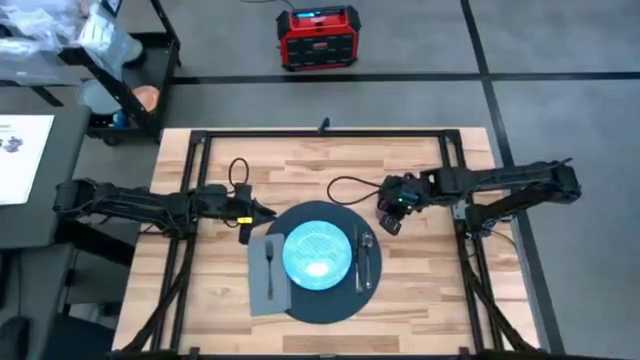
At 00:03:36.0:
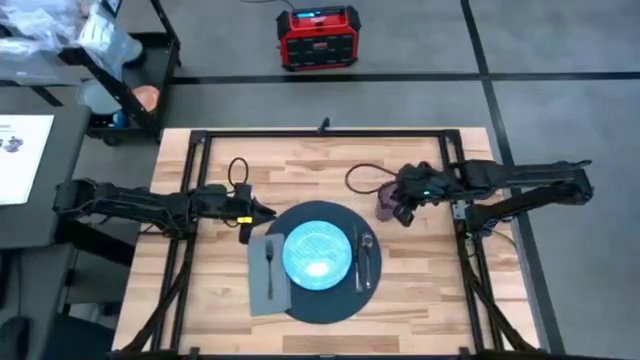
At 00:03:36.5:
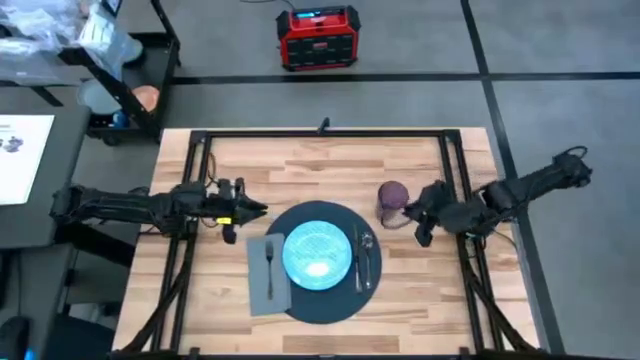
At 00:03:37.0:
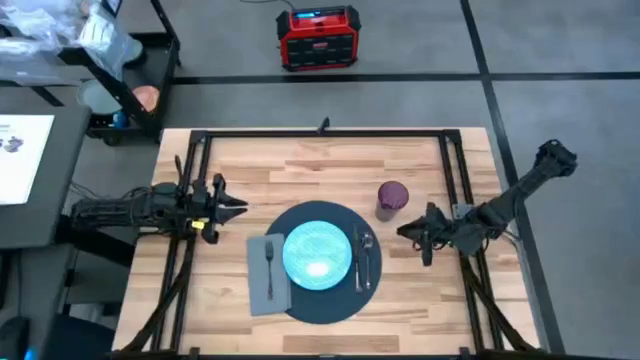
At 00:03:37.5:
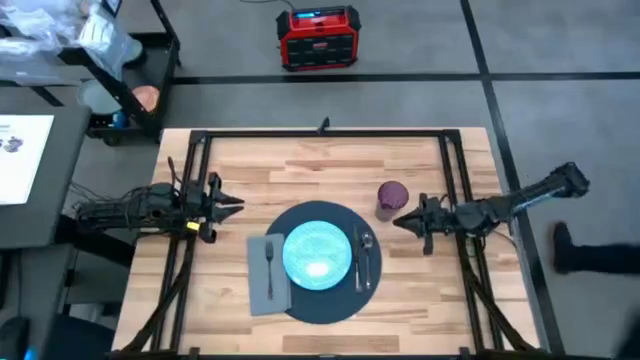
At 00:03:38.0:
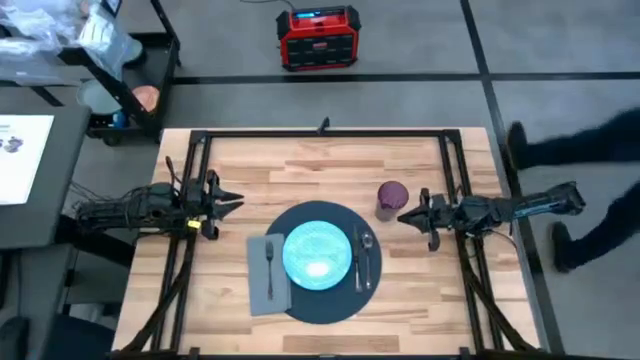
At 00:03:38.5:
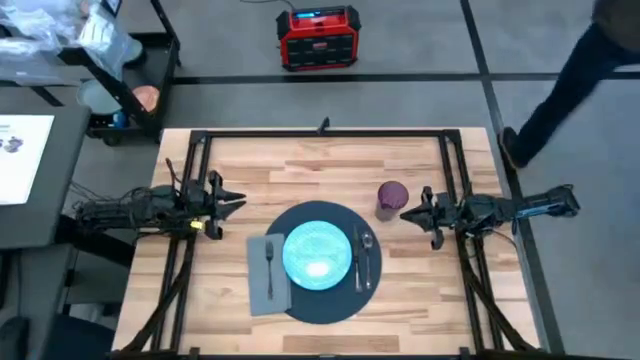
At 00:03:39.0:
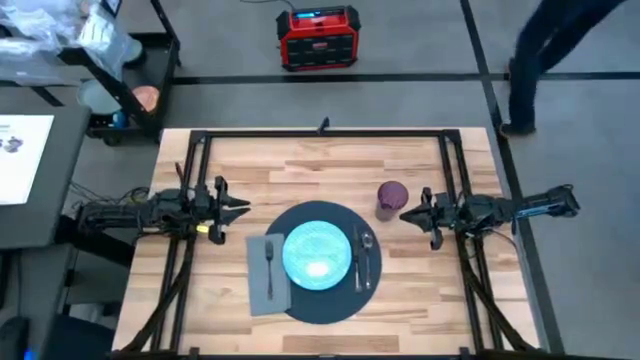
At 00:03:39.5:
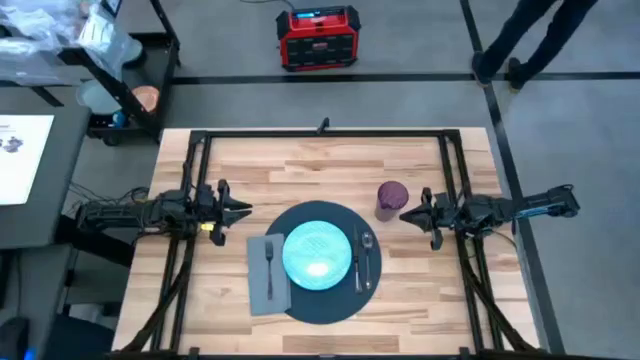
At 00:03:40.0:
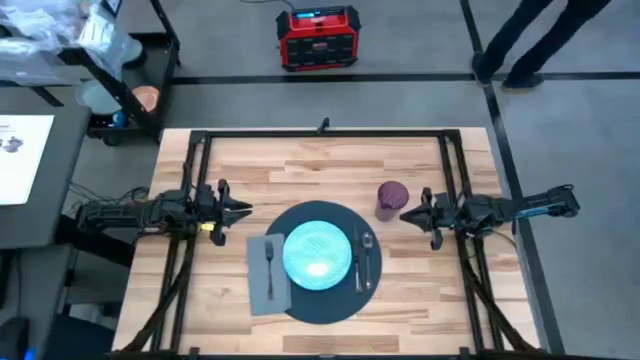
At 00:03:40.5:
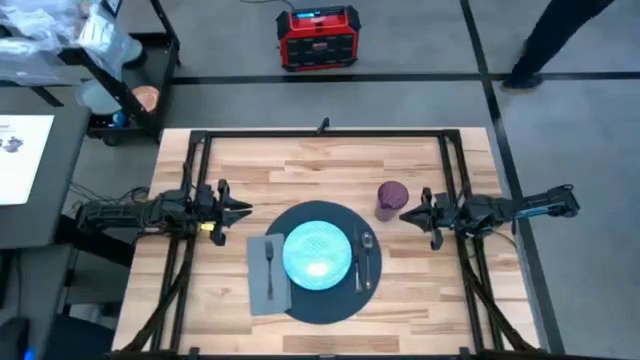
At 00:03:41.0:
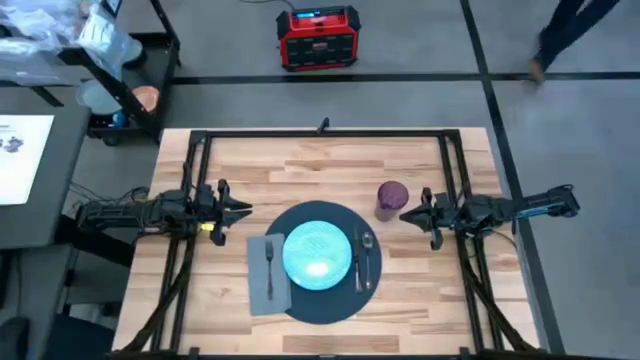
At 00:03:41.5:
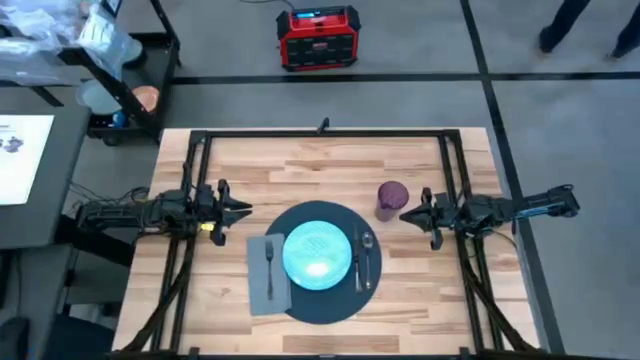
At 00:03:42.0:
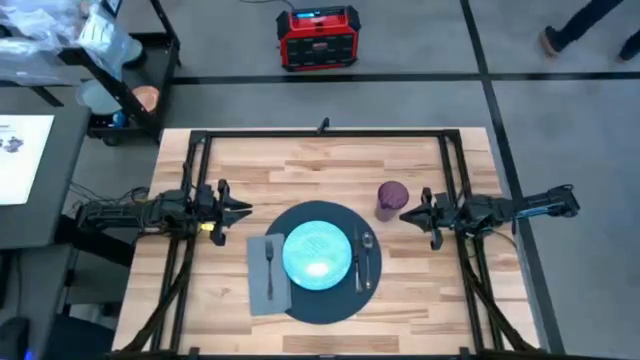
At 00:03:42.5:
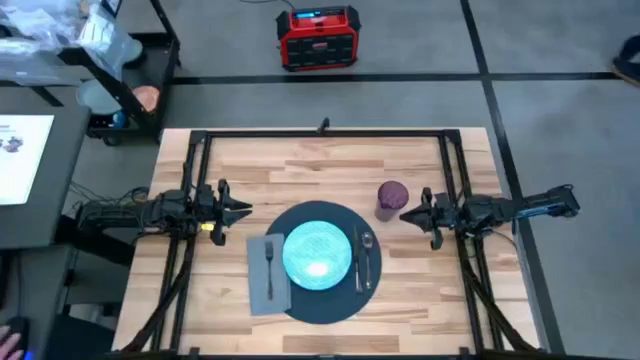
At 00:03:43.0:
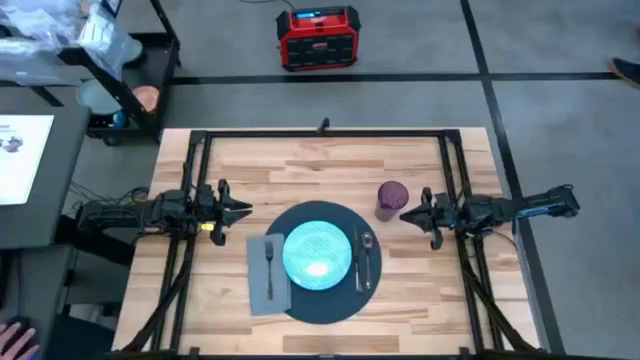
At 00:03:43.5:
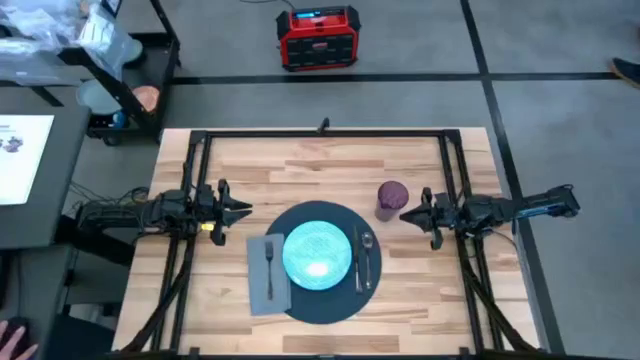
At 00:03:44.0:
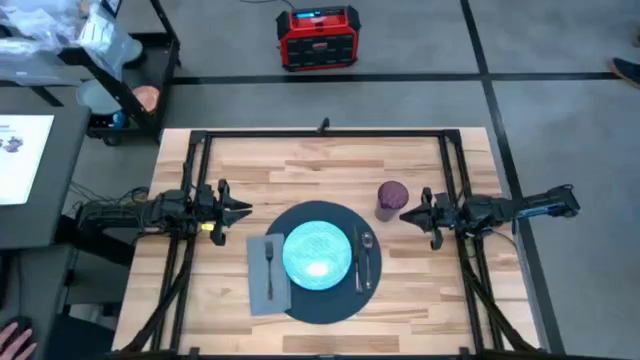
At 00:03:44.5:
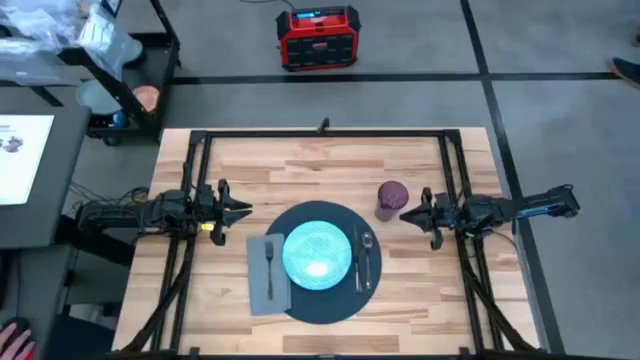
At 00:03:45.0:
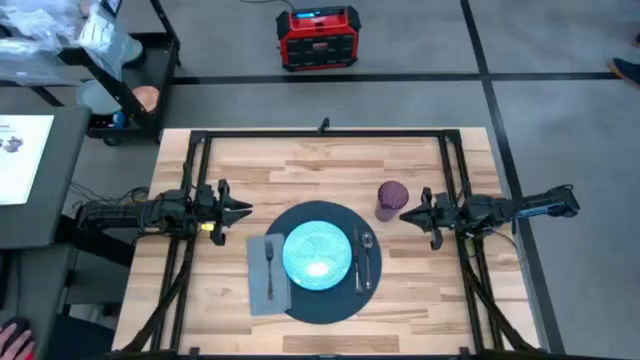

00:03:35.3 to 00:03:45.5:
Task: Set table place
Return to Home Position

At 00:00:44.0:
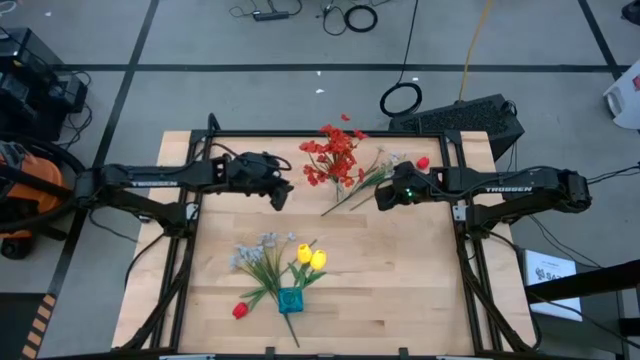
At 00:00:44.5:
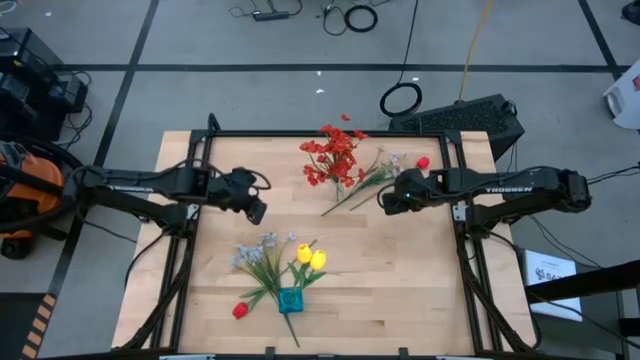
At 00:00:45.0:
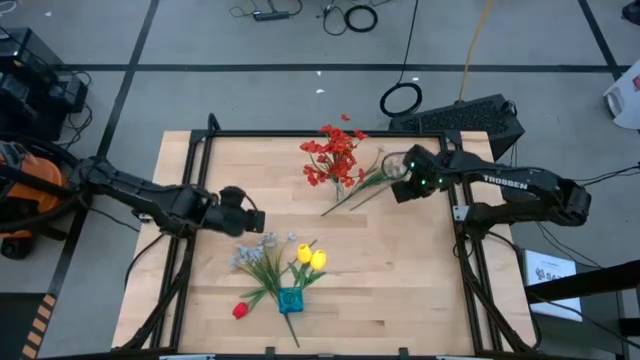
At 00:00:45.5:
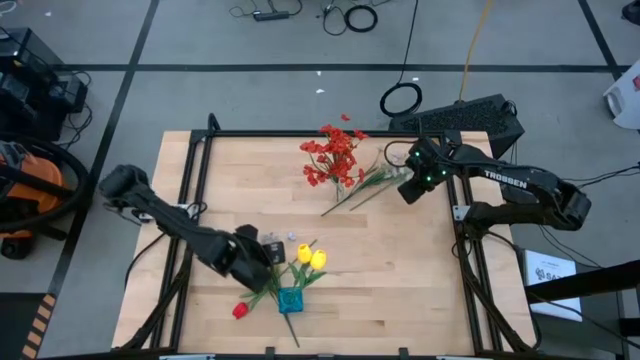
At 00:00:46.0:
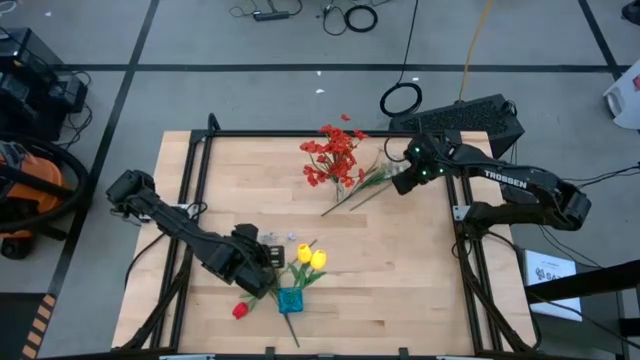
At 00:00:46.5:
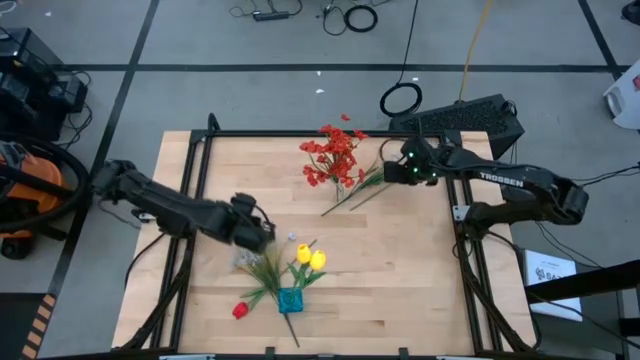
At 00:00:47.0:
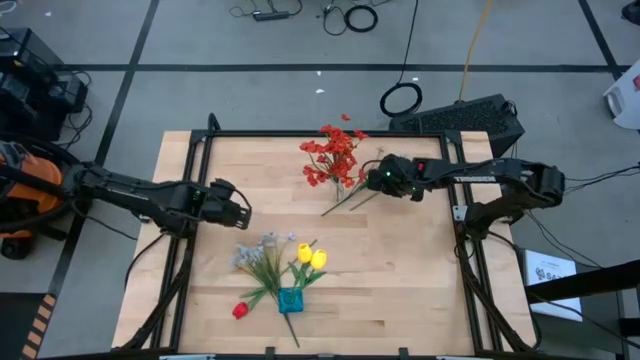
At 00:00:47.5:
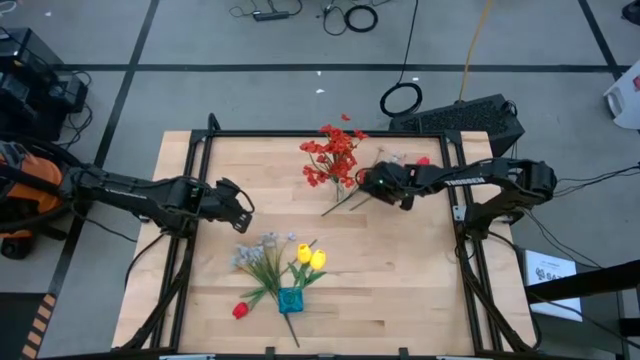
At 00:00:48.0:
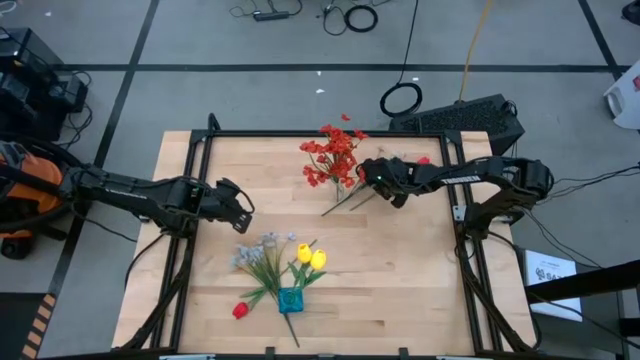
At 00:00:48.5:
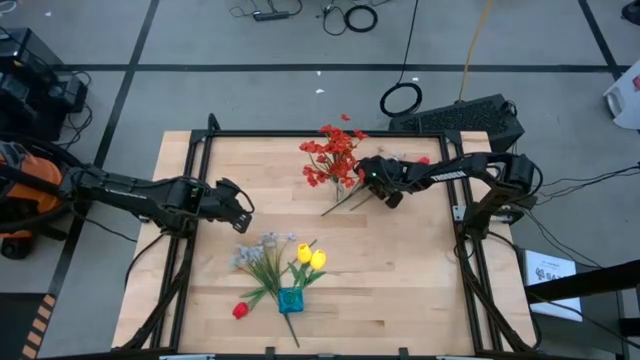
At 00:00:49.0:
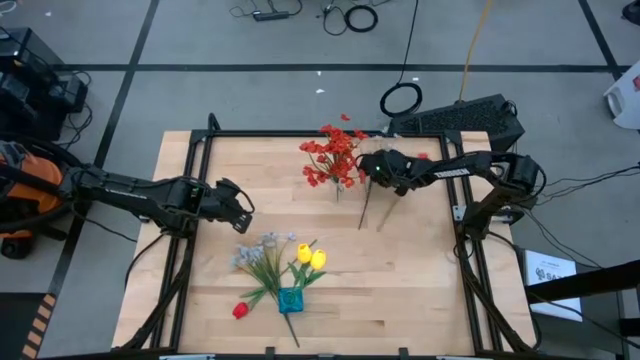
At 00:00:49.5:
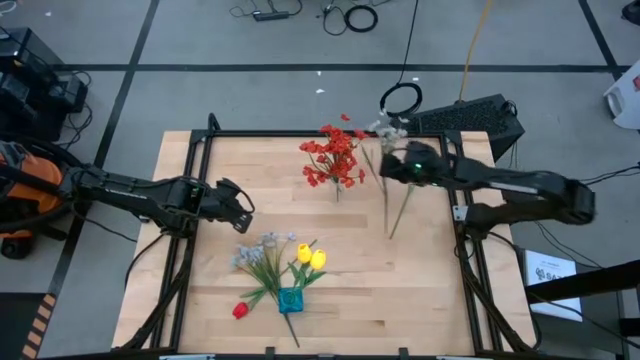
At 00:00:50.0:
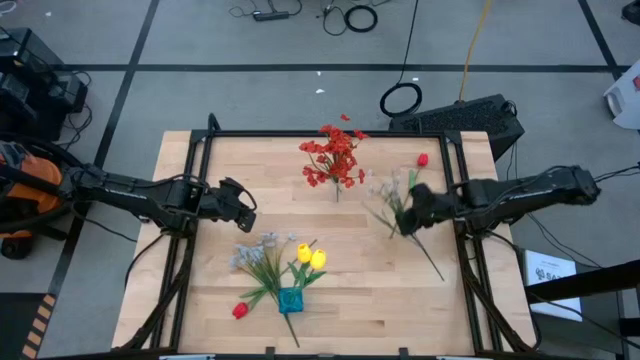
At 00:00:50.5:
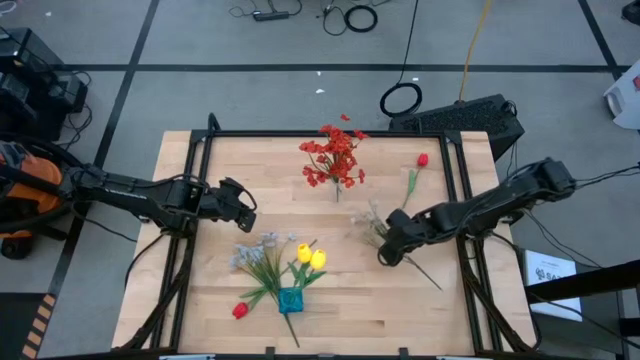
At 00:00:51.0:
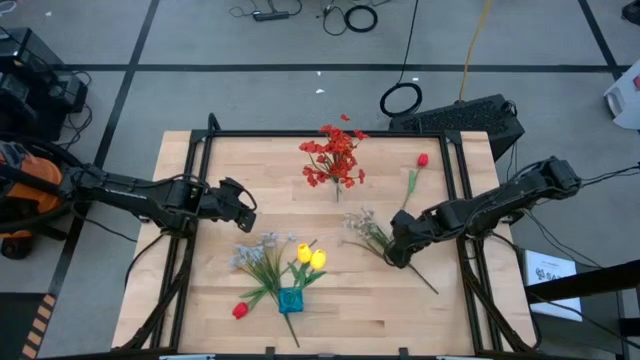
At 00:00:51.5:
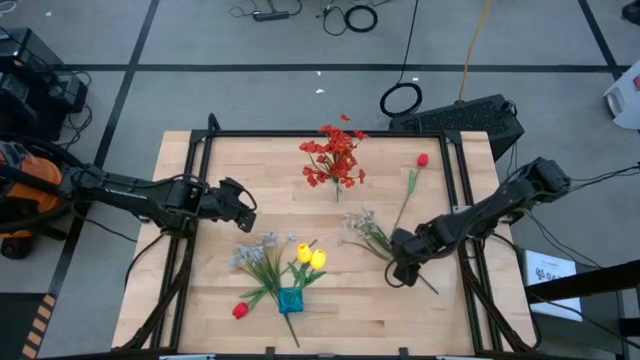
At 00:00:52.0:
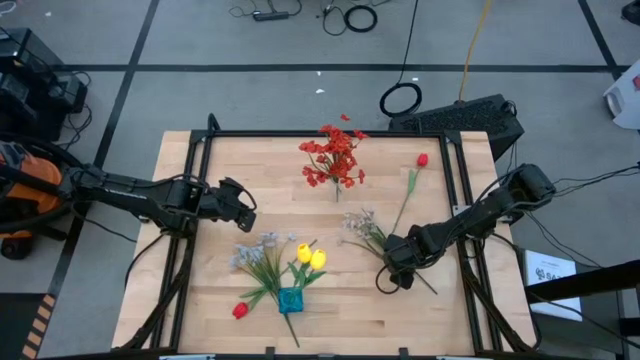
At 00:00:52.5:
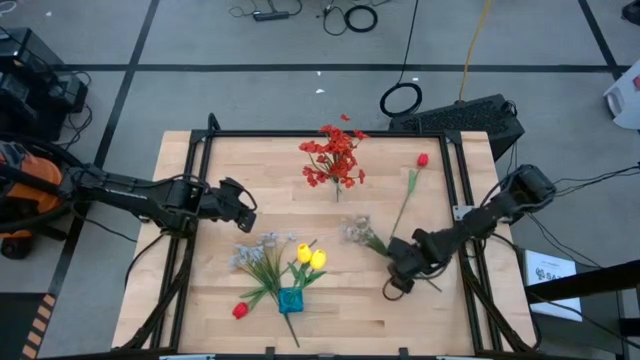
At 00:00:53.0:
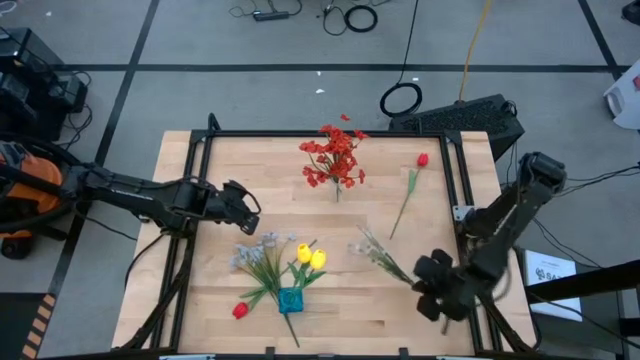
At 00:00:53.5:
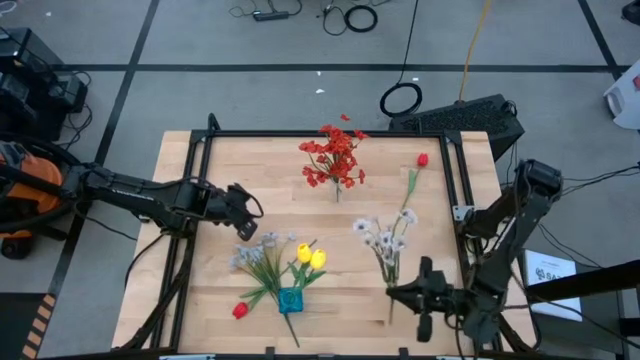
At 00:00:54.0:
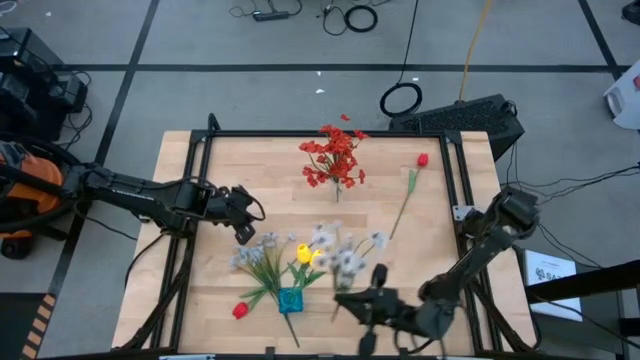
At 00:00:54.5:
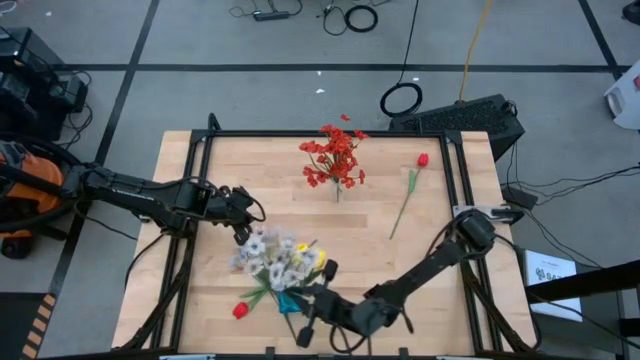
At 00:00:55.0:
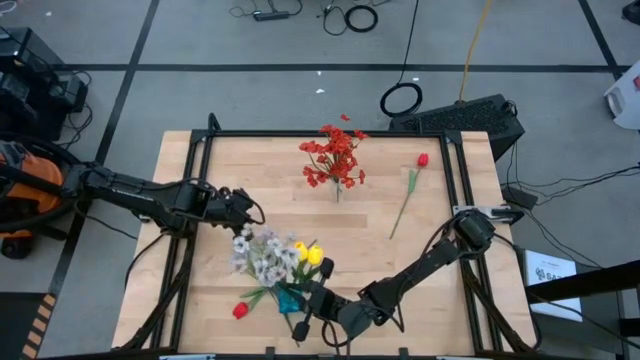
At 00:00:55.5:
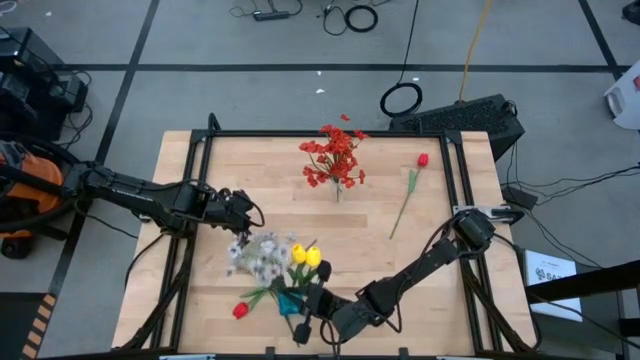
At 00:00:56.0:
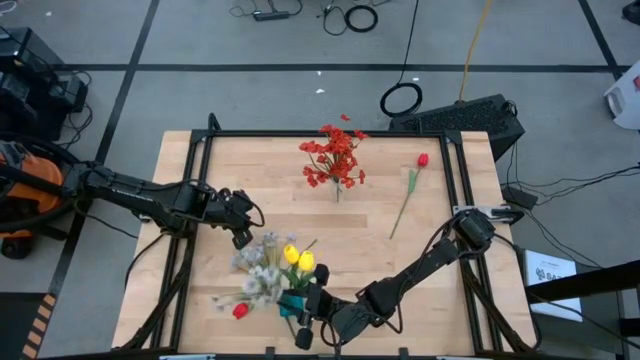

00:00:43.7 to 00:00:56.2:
Task: Sort flowers into vase by color
Put the top white flowers into the blue flower vase
